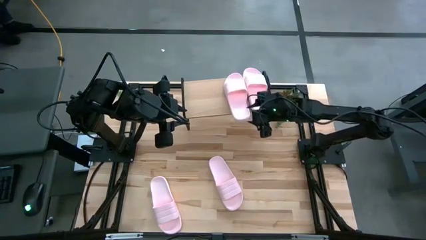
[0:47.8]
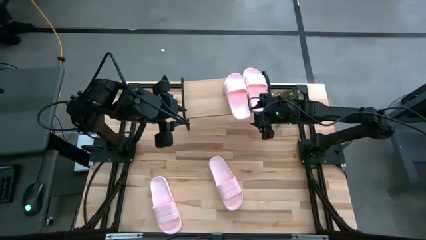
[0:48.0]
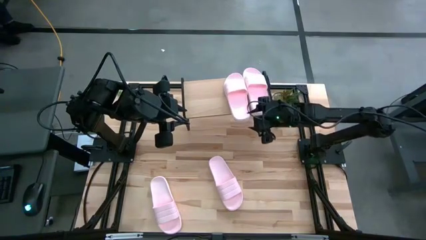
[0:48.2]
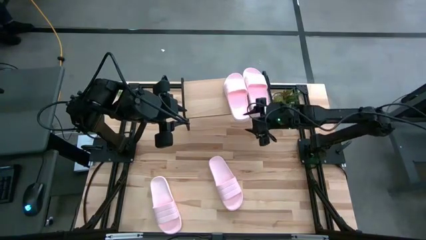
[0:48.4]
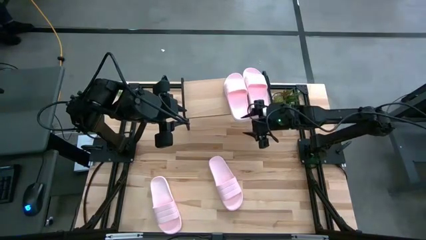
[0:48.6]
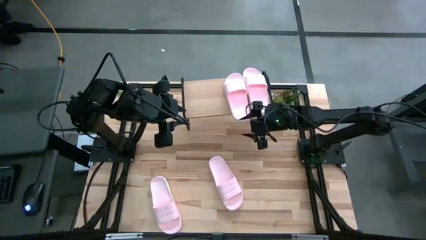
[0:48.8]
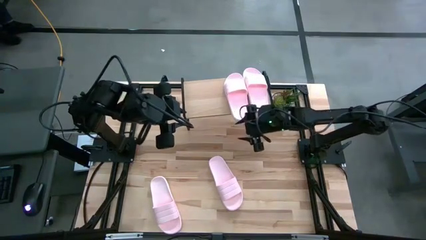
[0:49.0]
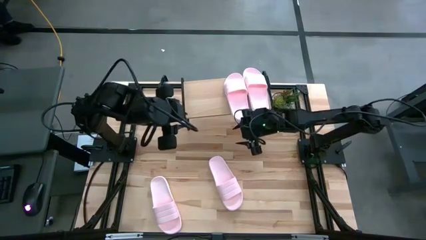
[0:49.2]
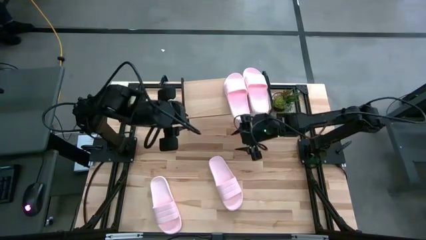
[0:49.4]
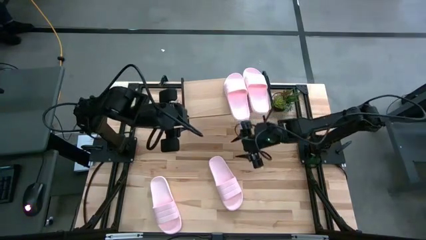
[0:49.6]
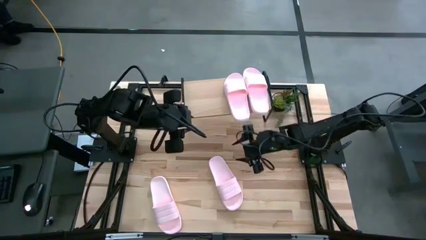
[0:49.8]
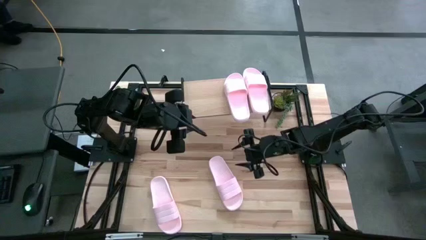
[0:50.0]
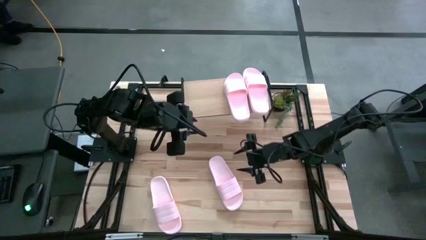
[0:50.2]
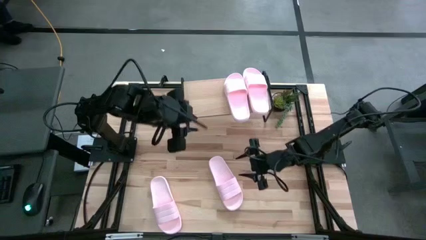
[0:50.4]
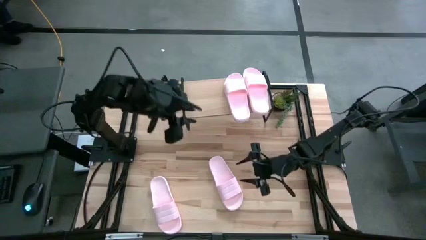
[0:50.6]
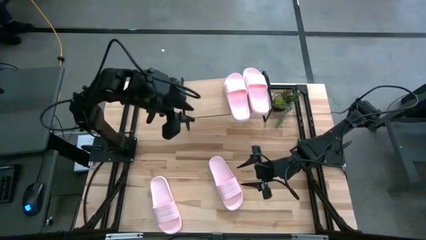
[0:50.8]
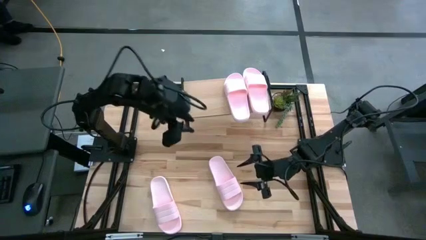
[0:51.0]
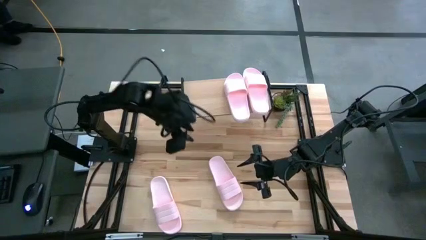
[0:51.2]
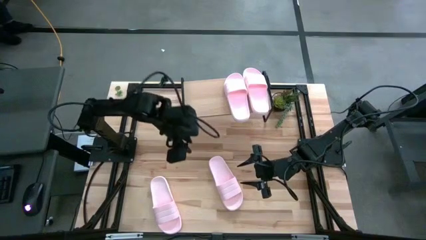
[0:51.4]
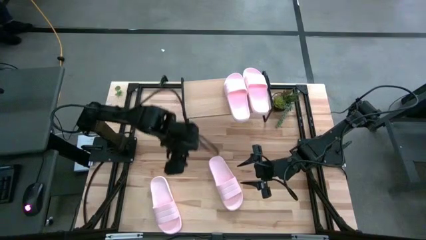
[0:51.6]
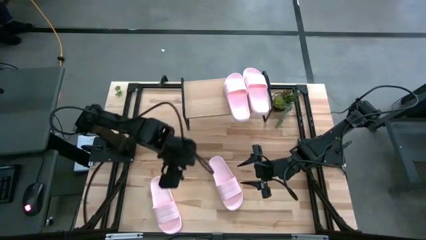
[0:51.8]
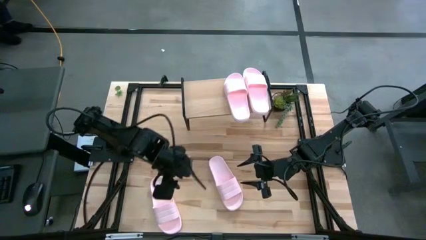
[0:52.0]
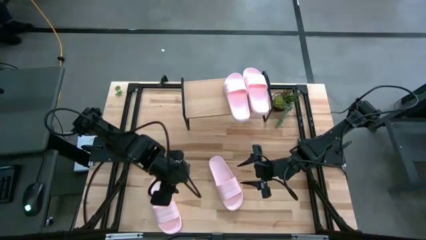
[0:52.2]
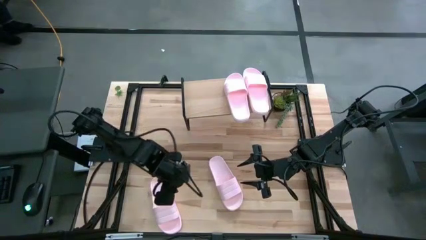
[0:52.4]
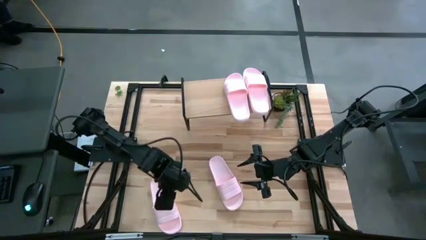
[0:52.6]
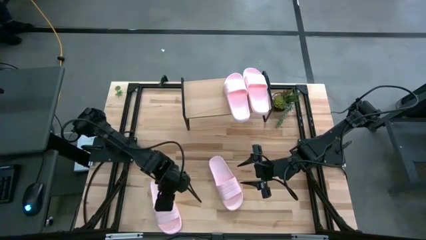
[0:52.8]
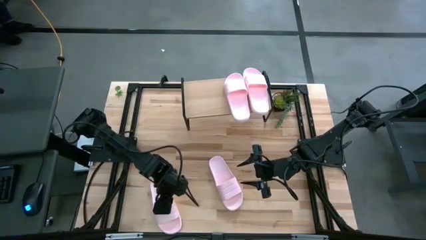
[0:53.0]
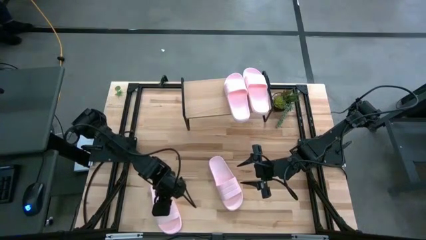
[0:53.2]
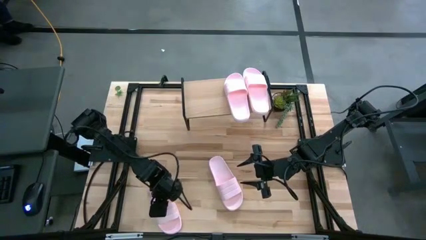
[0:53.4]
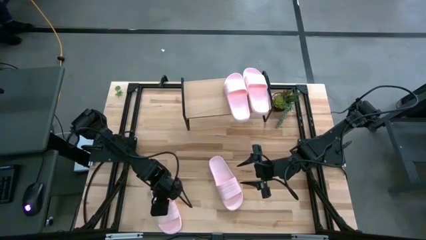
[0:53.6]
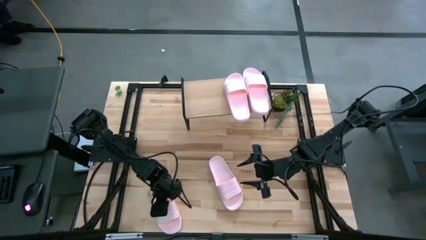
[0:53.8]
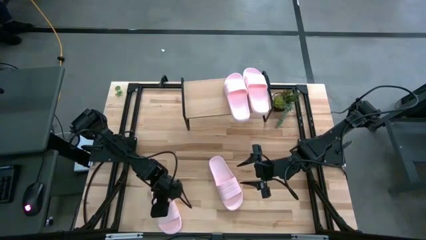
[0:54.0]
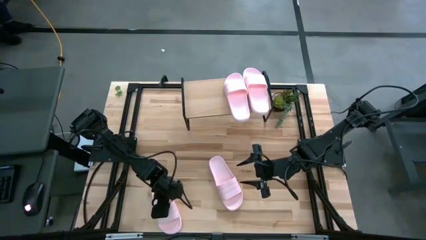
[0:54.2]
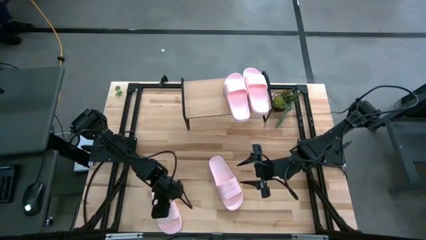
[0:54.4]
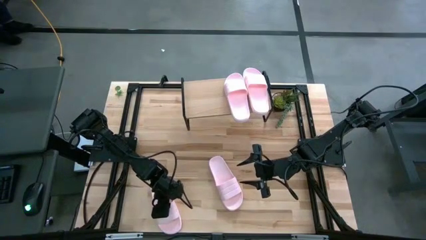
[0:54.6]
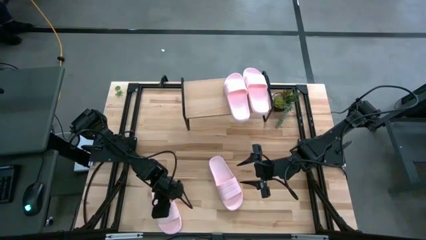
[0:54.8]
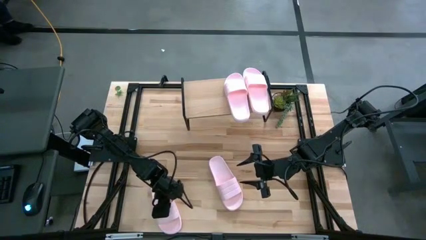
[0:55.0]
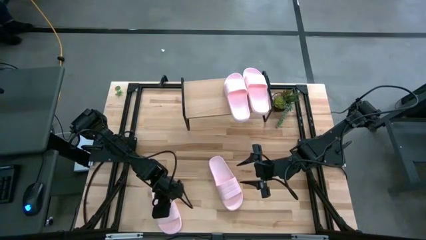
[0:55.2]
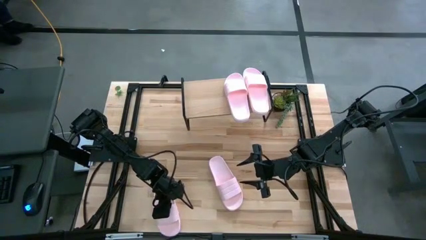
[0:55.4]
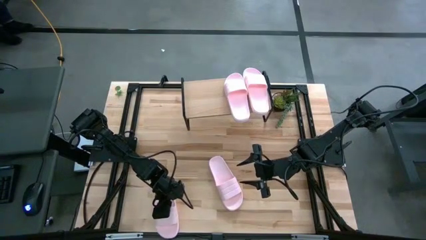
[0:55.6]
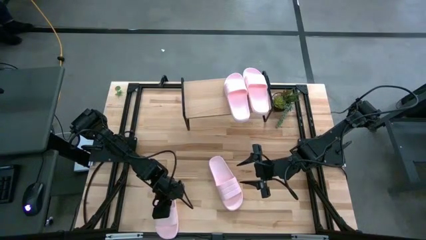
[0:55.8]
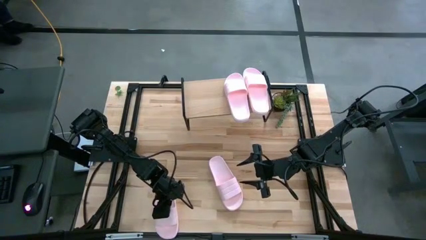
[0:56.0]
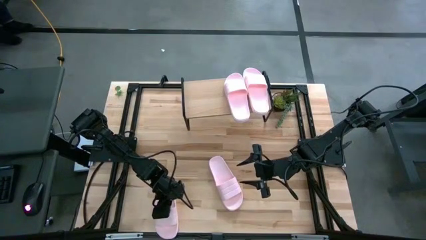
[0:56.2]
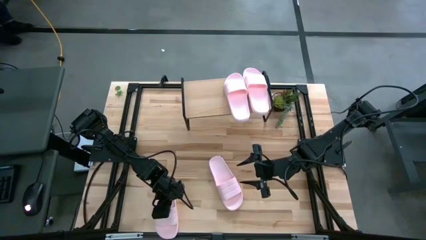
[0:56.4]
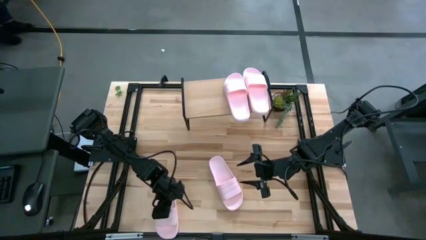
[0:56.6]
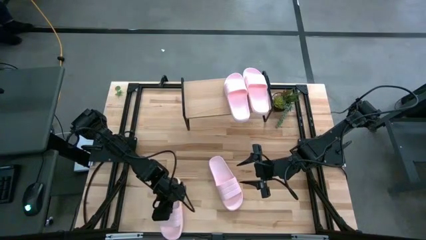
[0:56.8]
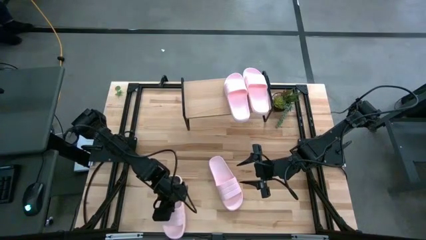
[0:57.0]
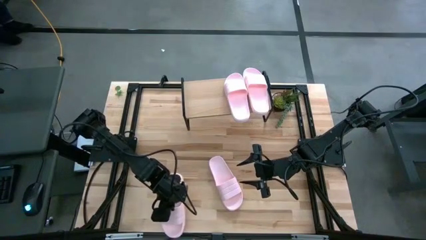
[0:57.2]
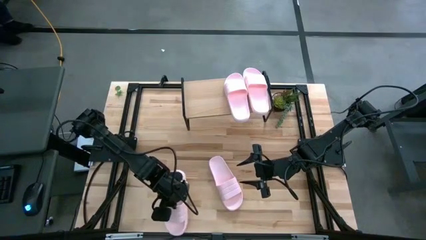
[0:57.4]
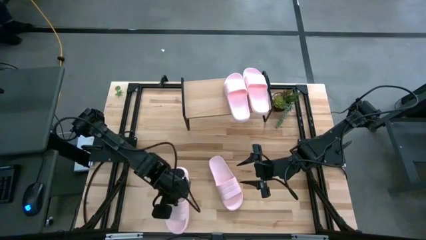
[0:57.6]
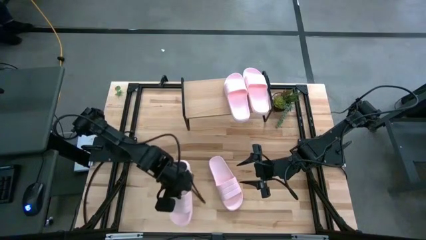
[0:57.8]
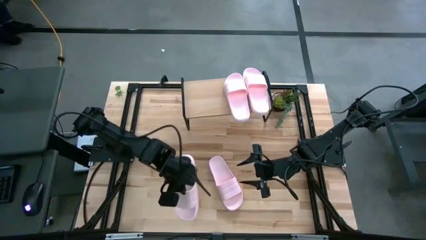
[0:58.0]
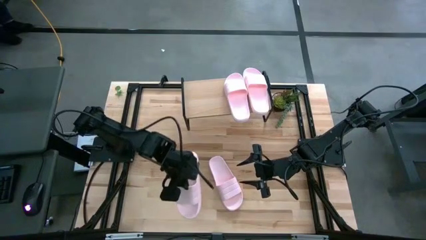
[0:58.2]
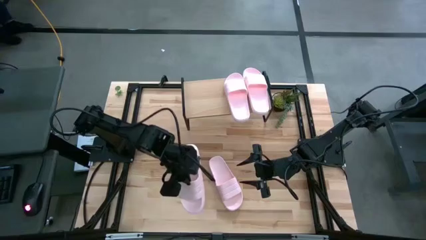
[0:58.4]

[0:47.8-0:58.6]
Task: Pick and place slides into the shelf
Put the pink slipper on the shelf
